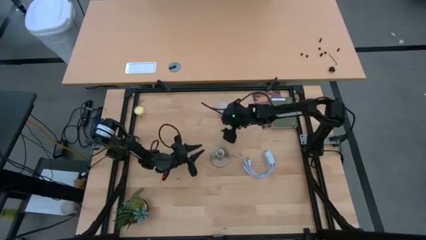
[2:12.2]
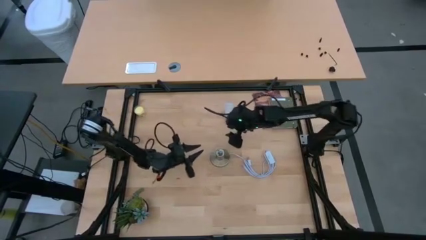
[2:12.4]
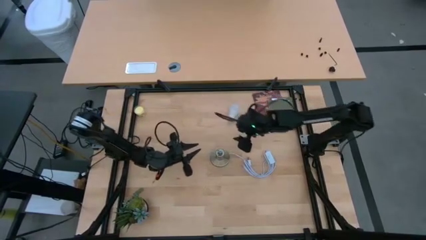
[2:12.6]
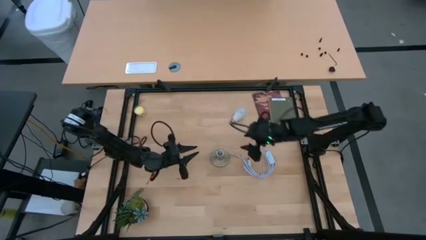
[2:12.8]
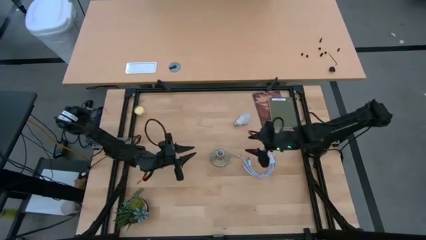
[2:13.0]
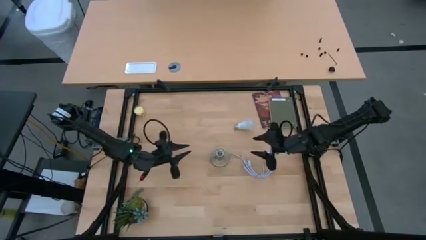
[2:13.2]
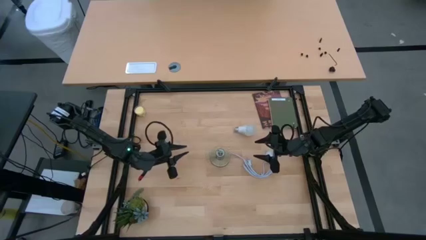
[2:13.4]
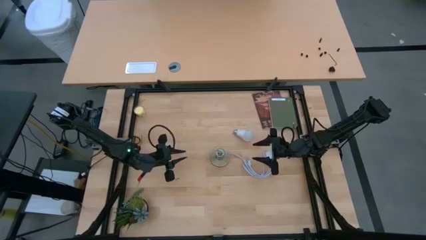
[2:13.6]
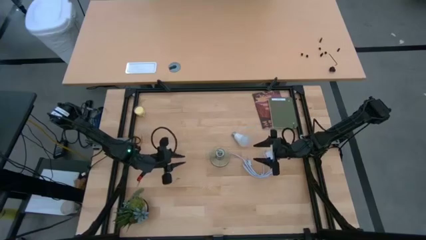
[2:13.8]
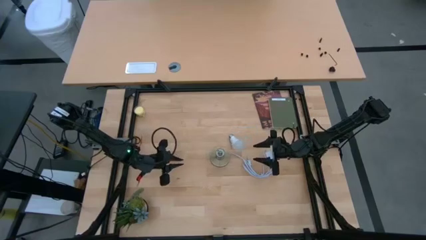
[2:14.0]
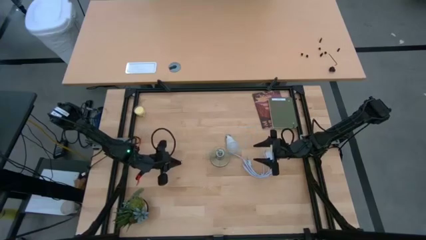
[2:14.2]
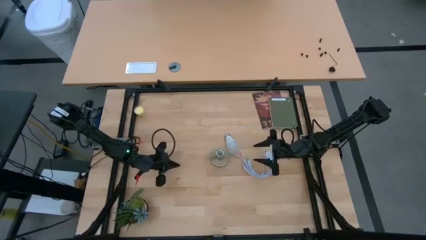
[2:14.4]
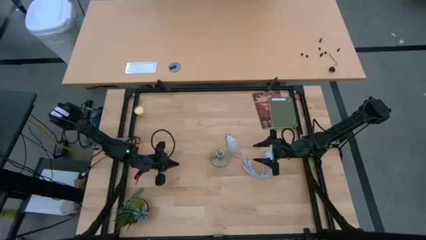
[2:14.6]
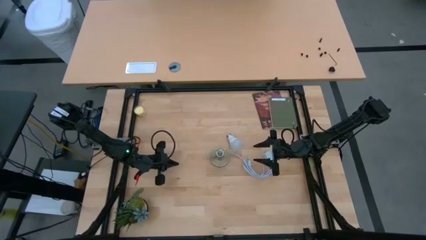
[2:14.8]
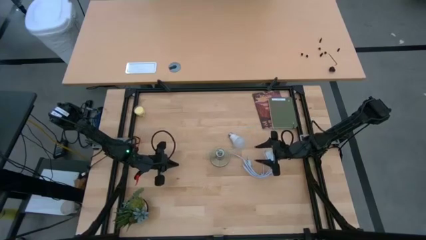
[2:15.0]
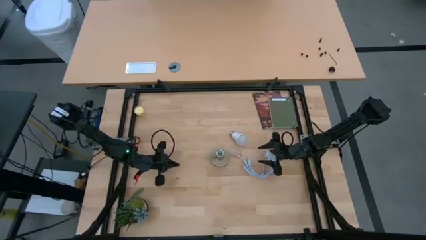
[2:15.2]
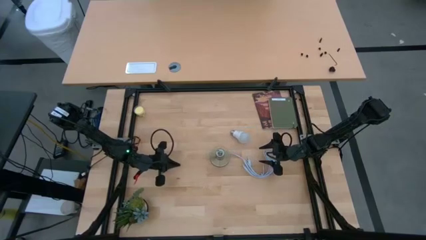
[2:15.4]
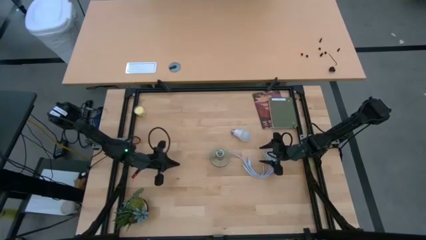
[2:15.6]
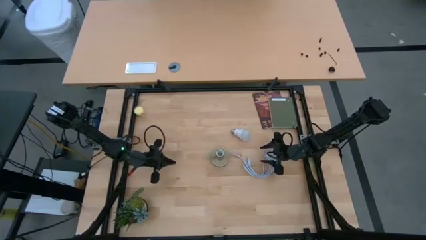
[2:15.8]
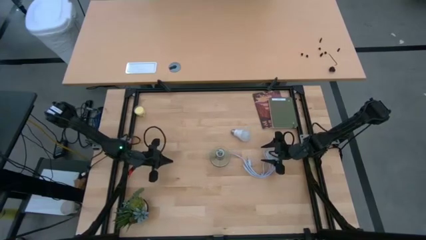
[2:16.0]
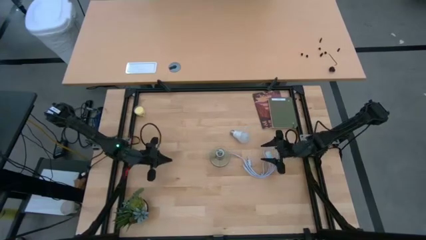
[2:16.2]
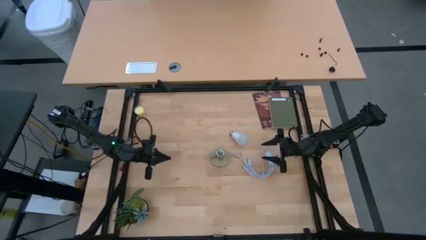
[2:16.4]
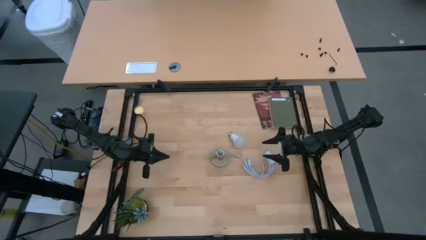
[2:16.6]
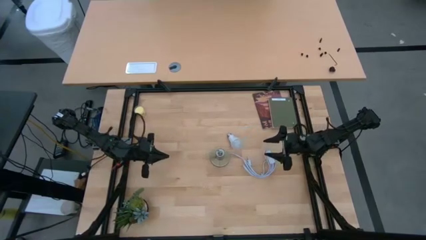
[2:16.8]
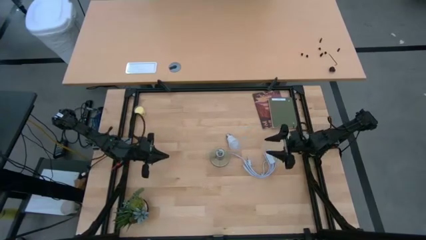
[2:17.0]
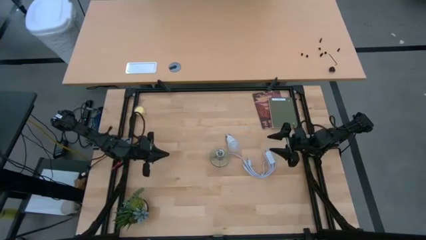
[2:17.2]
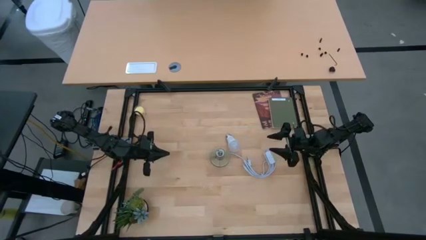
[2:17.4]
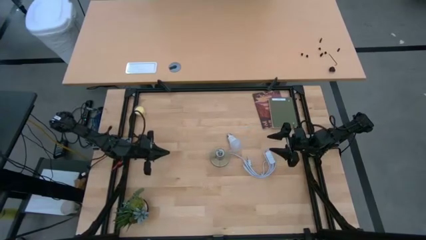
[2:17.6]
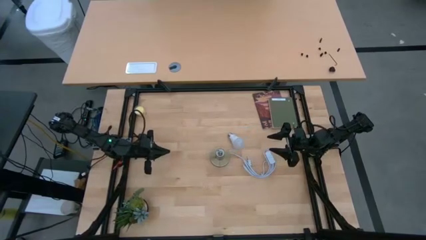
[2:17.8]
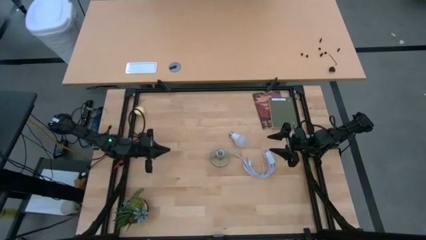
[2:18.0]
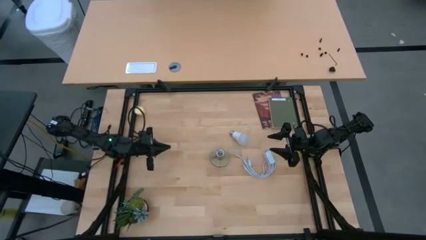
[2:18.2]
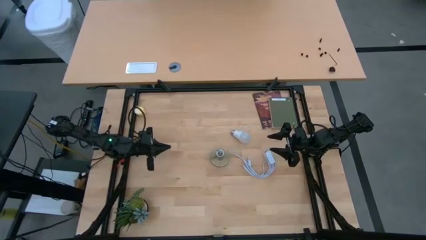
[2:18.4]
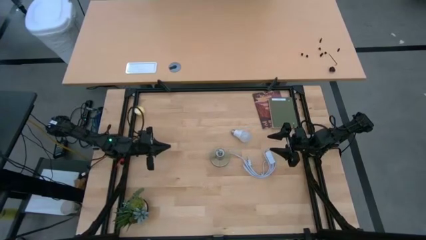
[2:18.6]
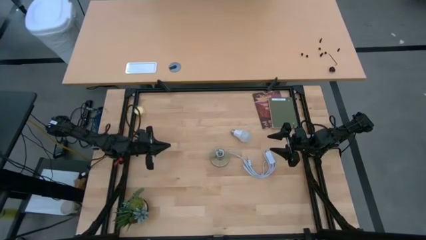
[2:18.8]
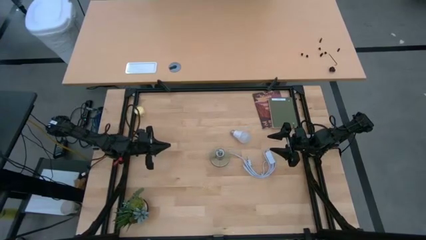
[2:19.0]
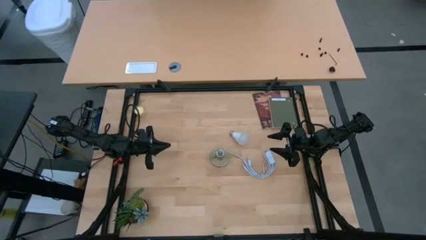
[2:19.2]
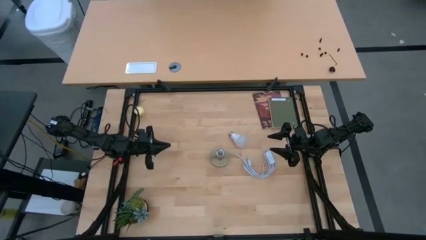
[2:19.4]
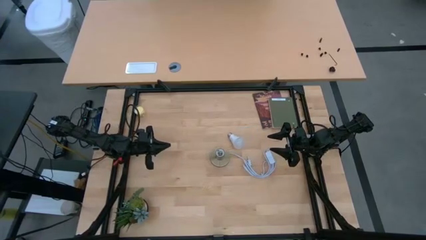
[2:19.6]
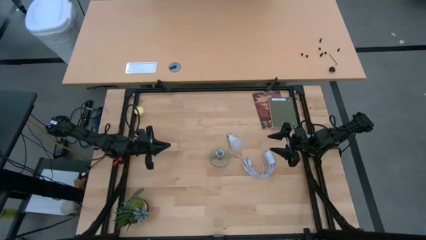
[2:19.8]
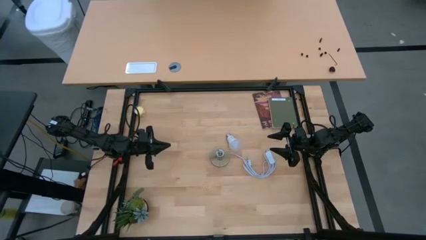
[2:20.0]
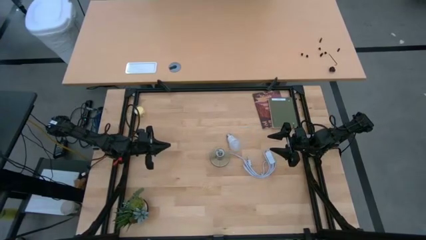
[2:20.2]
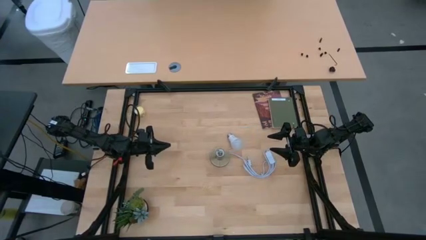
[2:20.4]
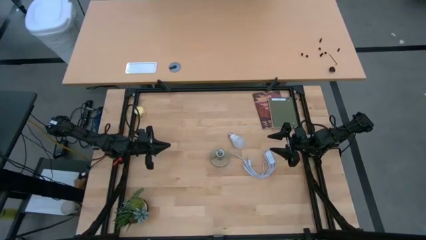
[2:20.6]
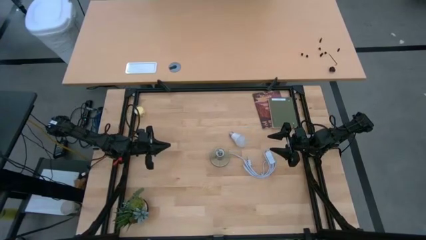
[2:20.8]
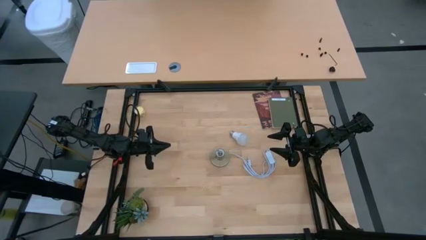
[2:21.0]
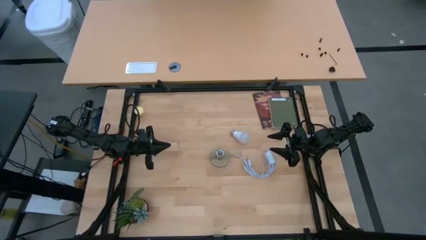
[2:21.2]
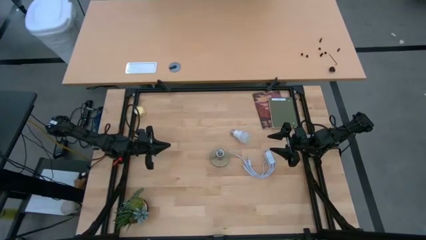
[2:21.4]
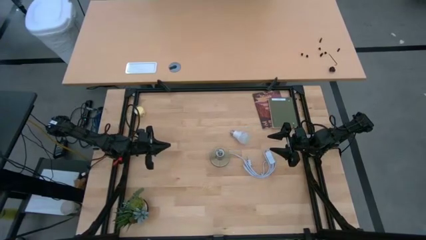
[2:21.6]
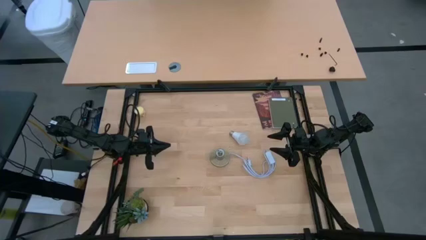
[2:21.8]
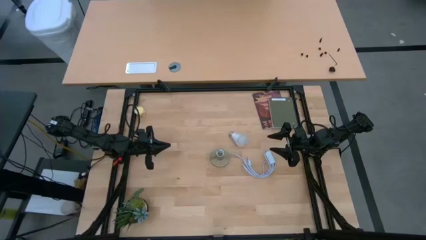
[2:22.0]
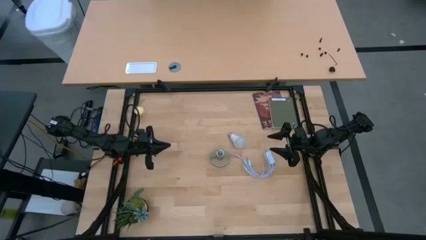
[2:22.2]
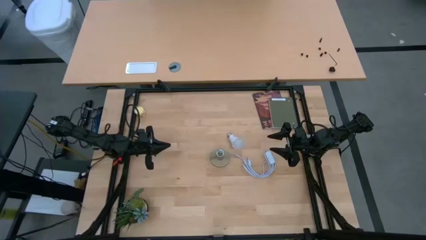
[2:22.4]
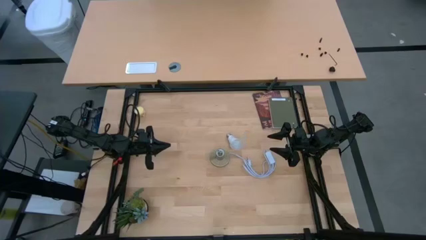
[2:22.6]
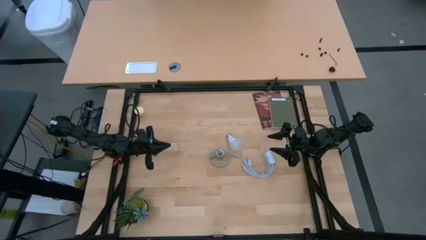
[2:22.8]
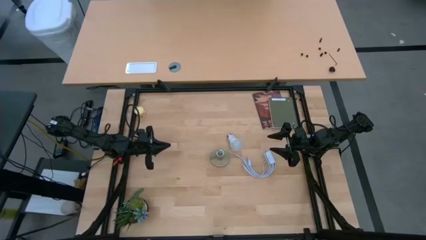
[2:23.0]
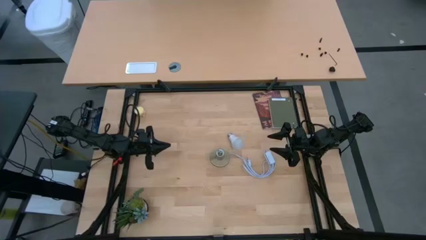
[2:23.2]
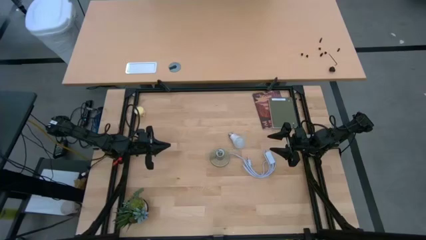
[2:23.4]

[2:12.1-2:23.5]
Task: Screw lightbulb
Return to Home Position

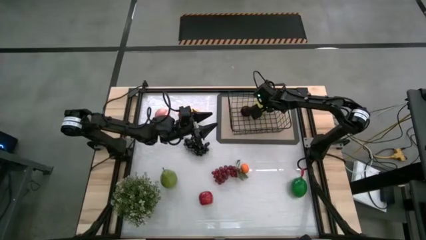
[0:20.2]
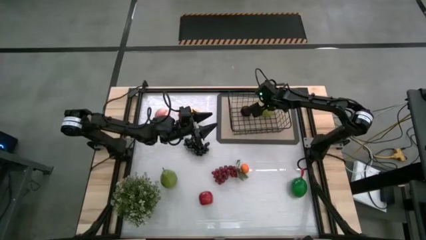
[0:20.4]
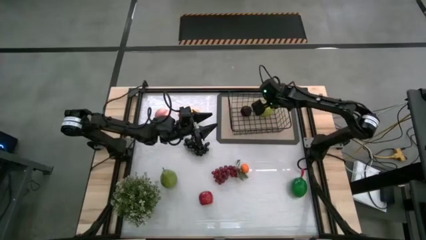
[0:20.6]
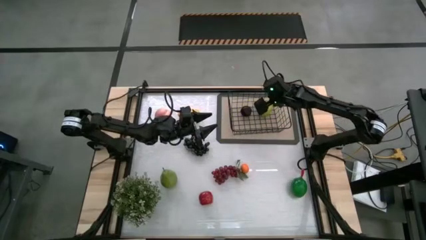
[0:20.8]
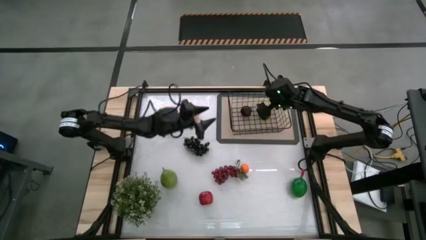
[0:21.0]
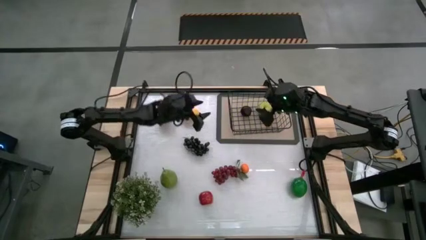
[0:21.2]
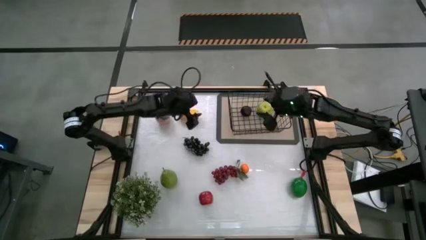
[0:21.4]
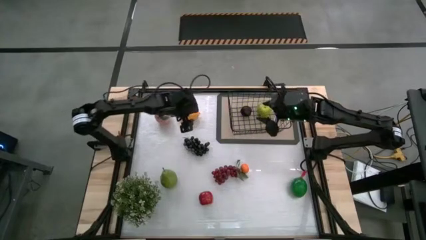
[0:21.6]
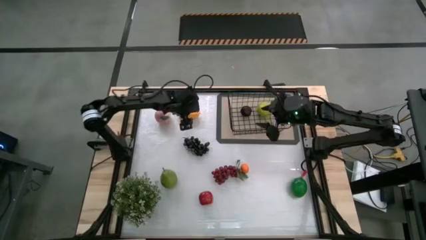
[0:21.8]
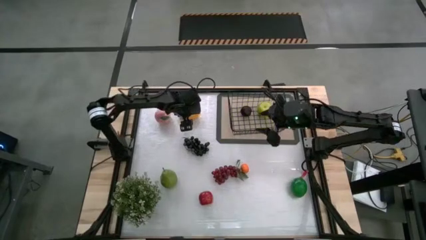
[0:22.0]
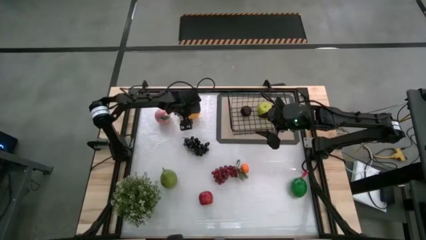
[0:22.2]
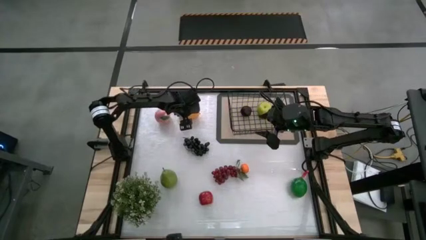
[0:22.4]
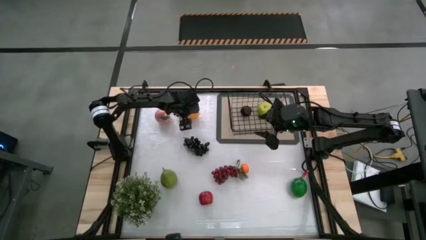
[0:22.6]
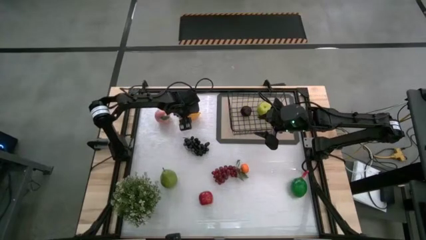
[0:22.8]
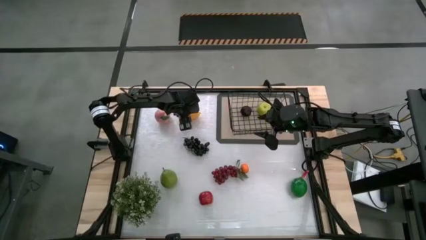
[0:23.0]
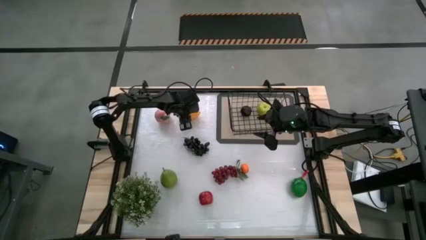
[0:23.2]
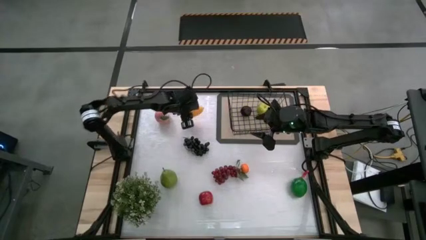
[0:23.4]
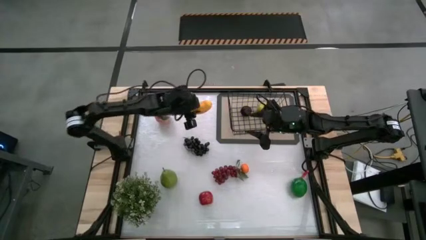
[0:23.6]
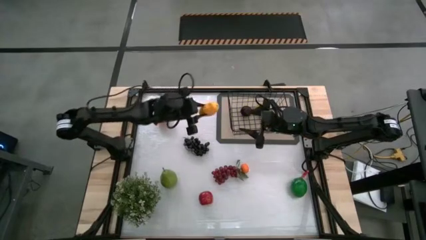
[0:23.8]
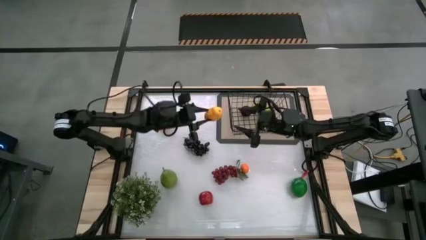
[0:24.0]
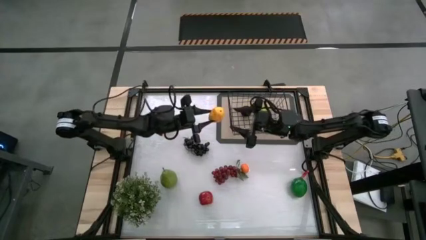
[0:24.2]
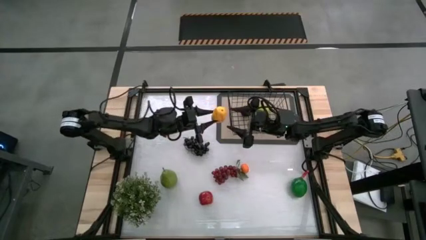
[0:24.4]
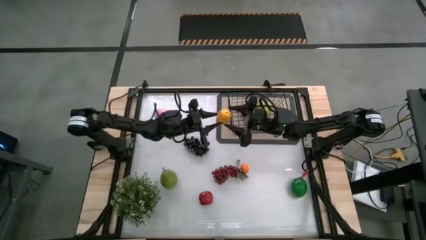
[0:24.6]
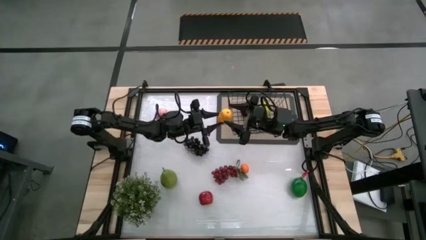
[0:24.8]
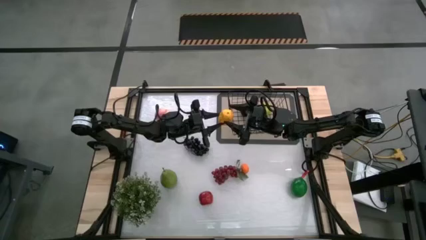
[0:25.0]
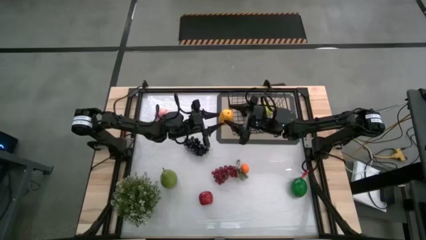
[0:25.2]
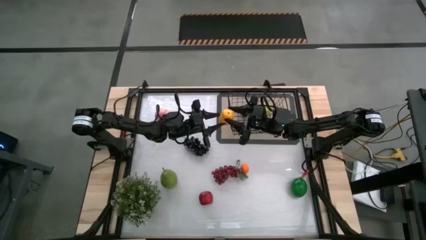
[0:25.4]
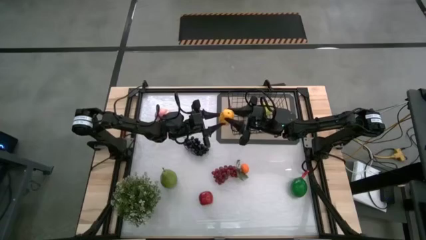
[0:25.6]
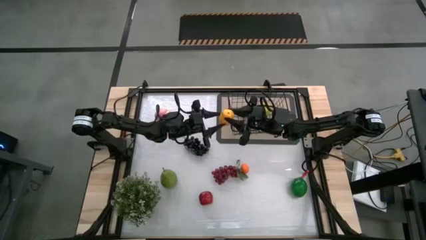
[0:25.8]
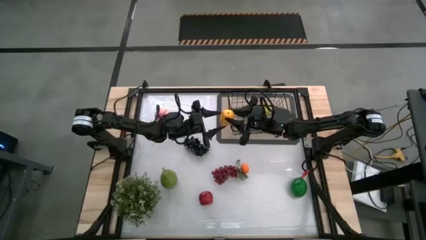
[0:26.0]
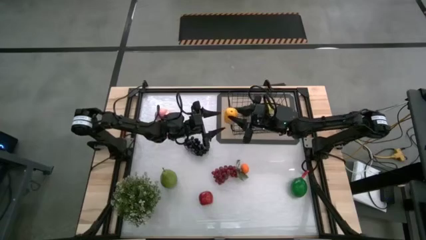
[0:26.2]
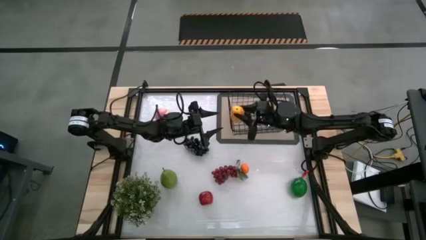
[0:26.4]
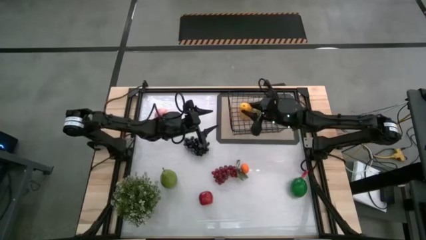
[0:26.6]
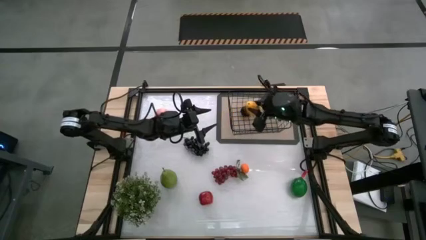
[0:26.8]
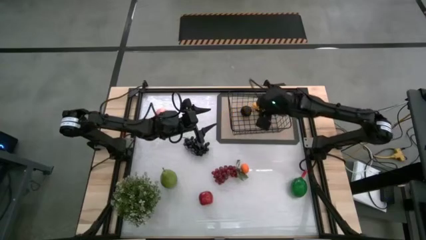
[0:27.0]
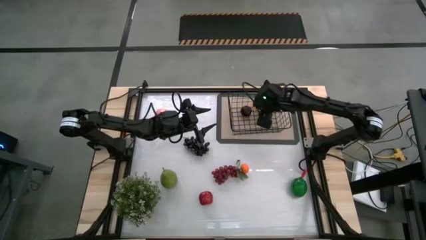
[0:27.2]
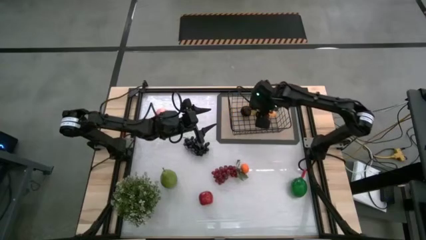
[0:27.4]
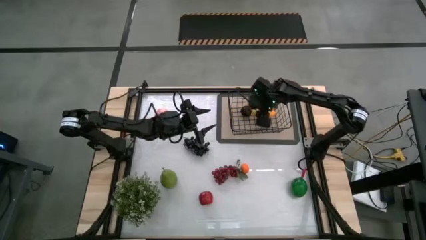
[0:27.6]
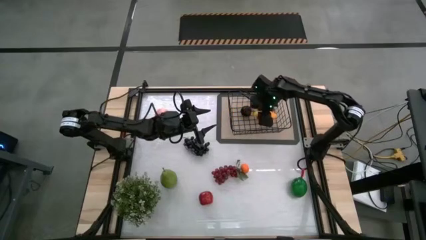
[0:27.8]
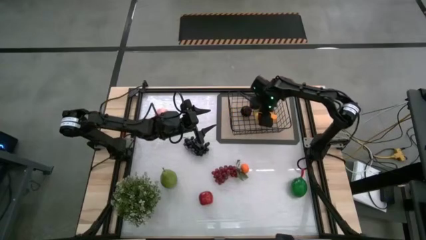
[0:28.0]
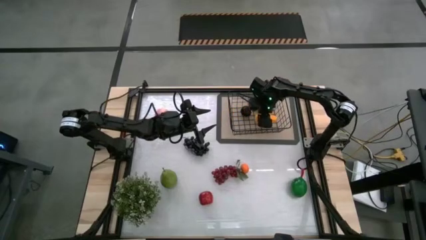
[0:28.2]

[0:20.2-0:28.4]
Task: Build produce basket
Put the mango into the black basket
